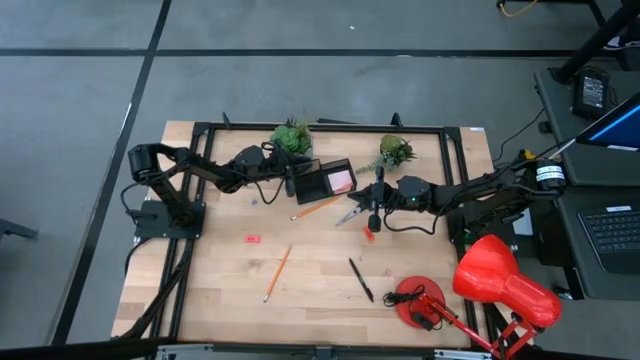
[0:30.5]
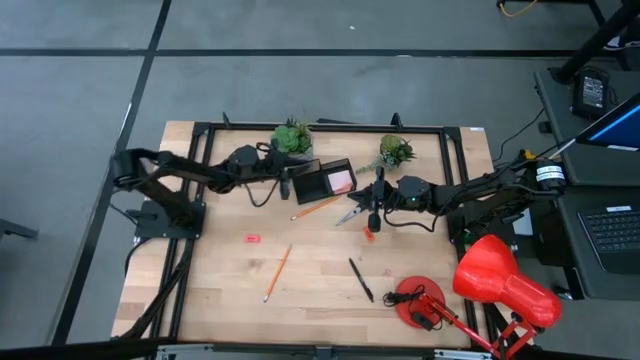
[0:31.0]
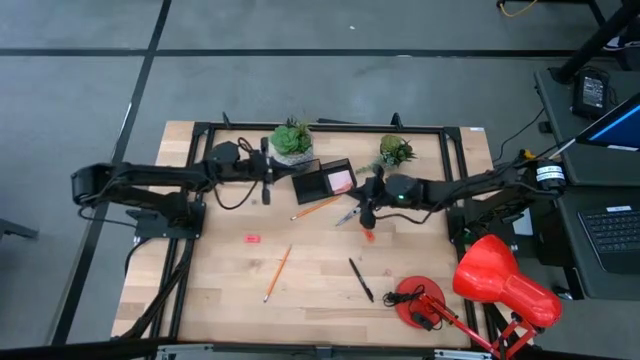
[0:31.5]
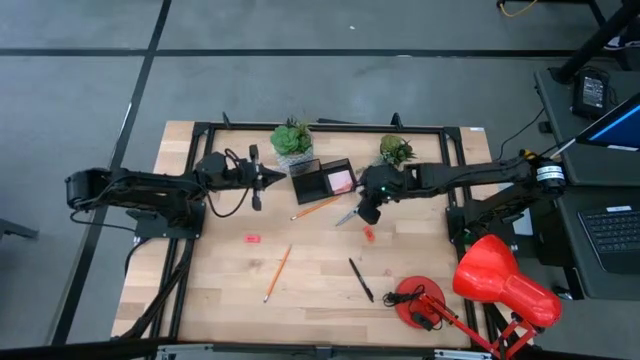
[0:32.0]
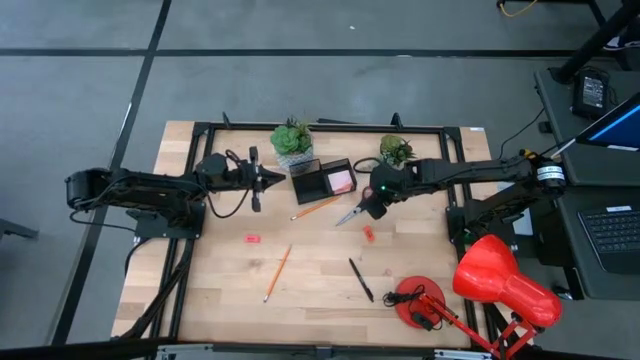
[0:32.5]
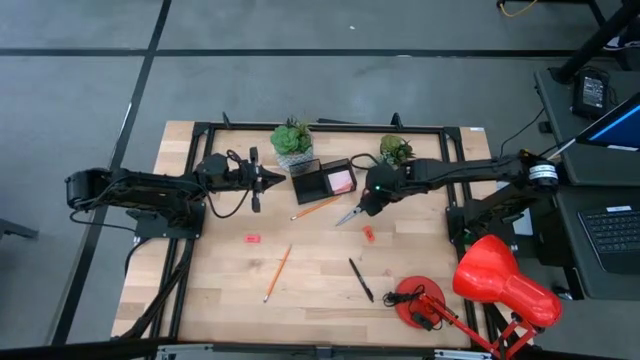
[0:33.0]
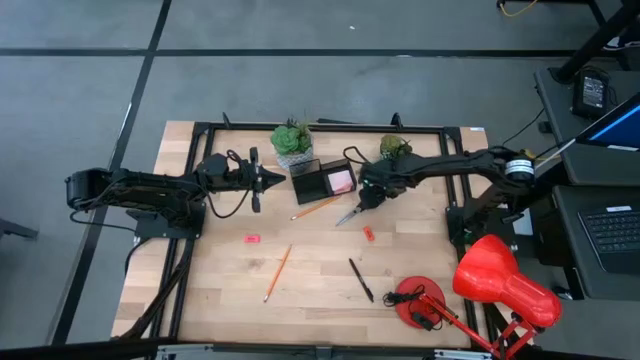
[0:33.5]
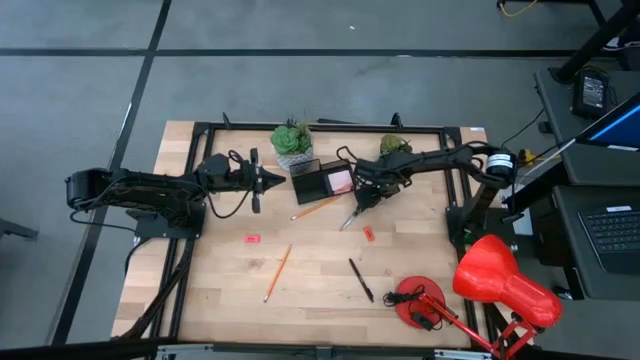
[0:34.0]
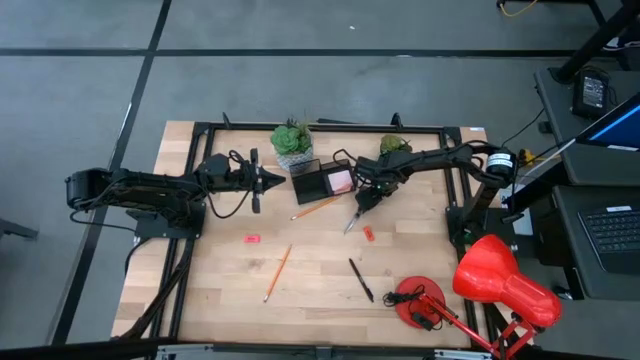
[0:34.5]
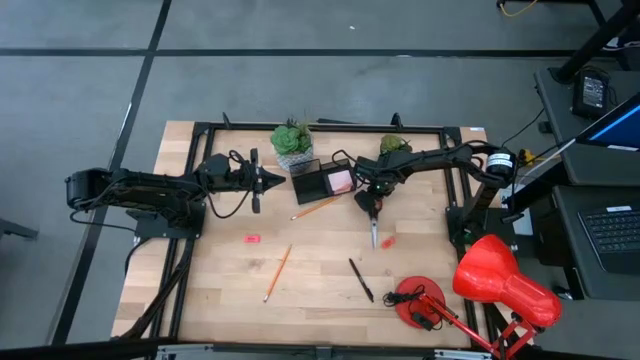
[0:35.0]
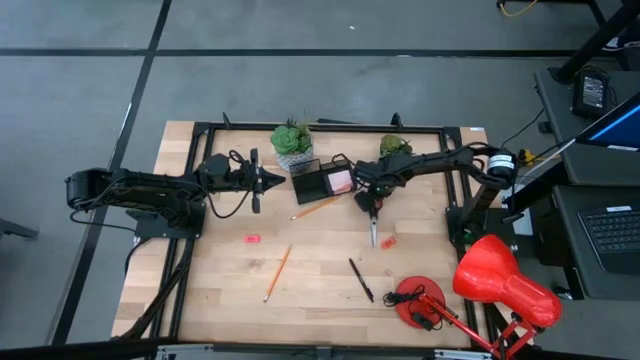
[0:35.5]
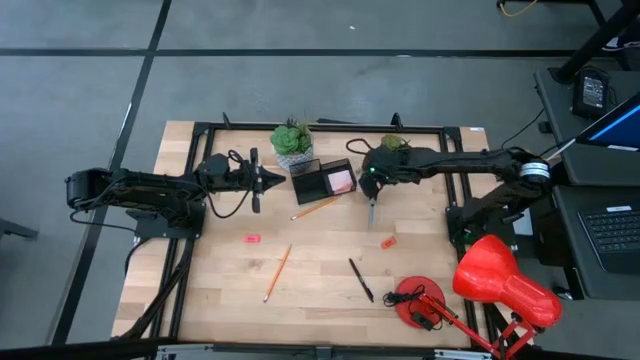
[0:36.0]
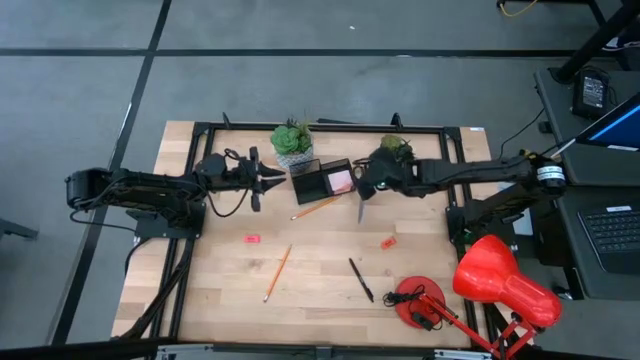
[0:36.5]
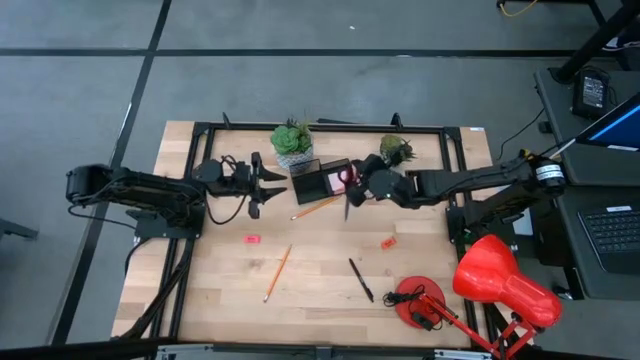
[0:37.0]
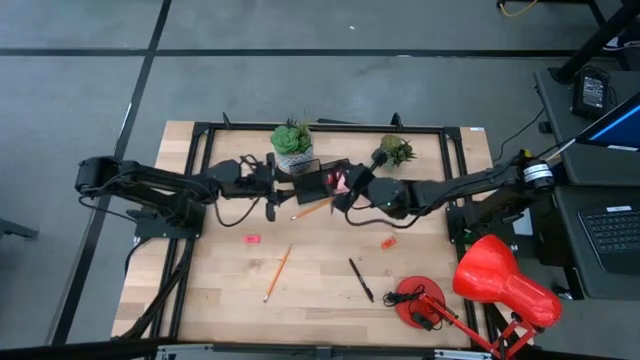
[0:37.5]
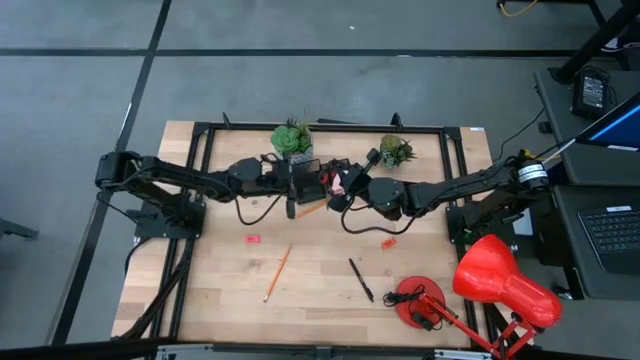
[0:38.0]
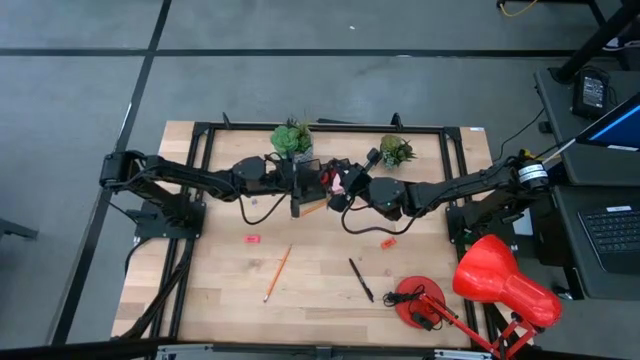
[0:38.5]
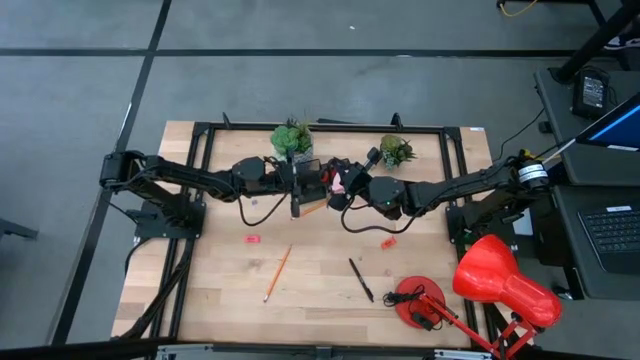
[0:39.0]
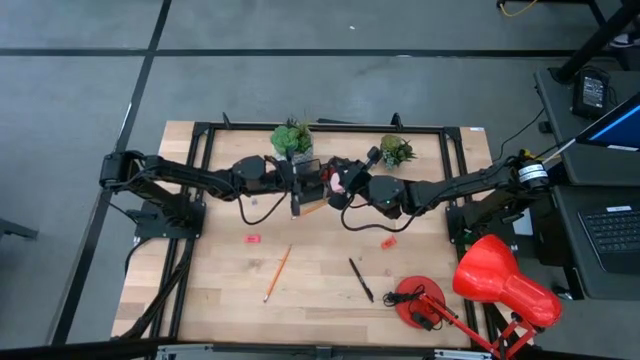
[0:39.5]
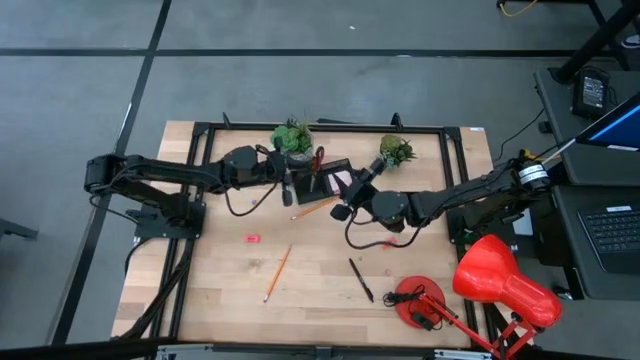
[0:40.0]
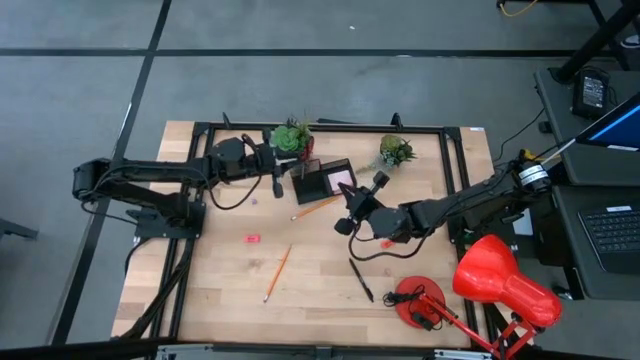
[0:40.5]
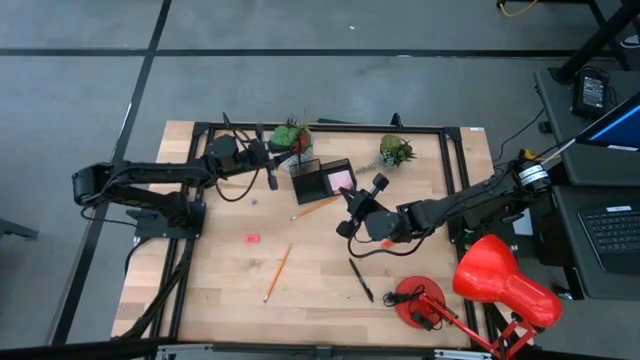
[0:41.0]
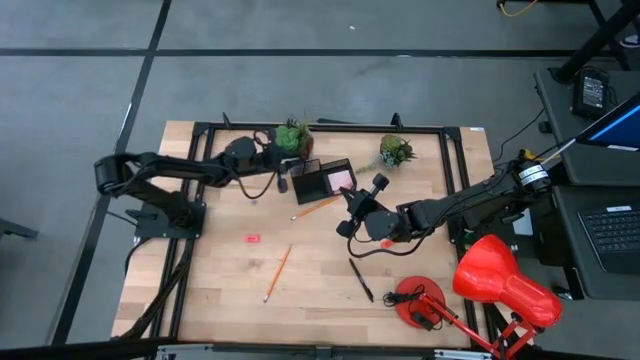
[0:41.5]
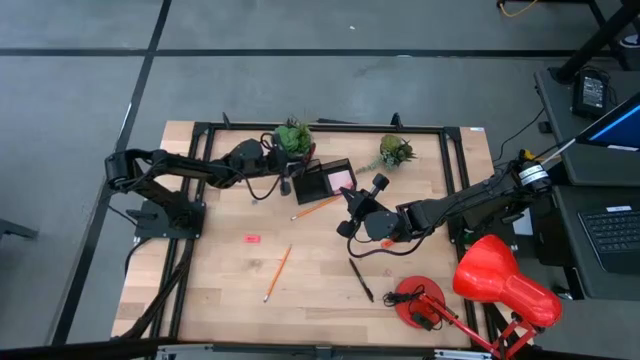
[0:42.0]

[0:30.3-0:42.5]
Task: Pick and place office supplies into organizer
Put the black scissors into the black desk organizer

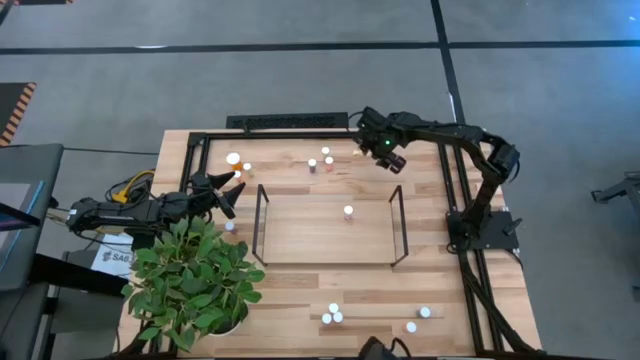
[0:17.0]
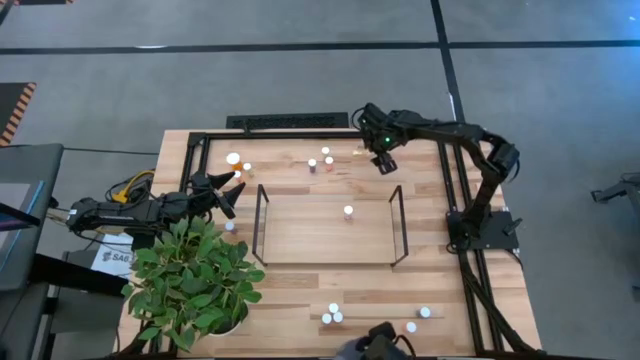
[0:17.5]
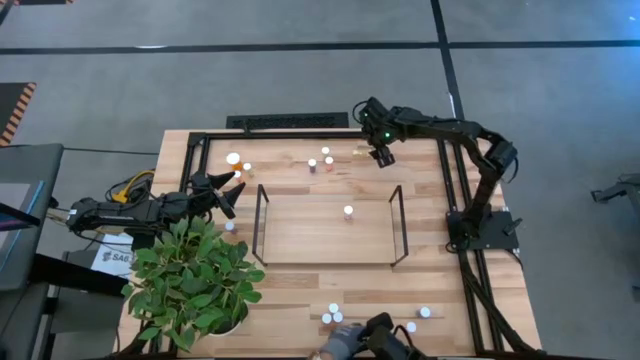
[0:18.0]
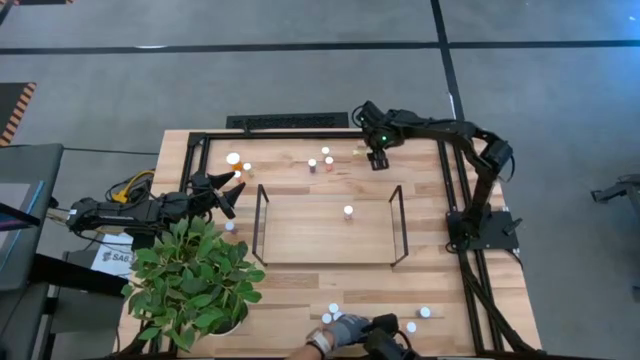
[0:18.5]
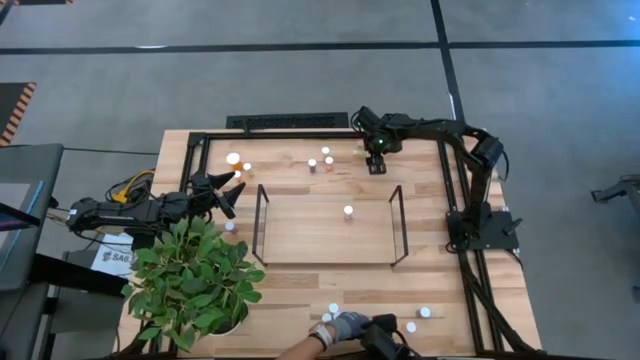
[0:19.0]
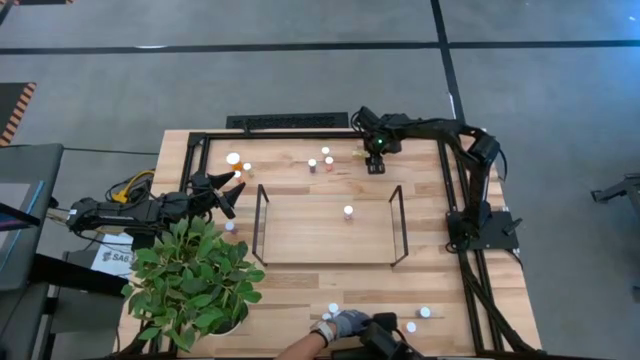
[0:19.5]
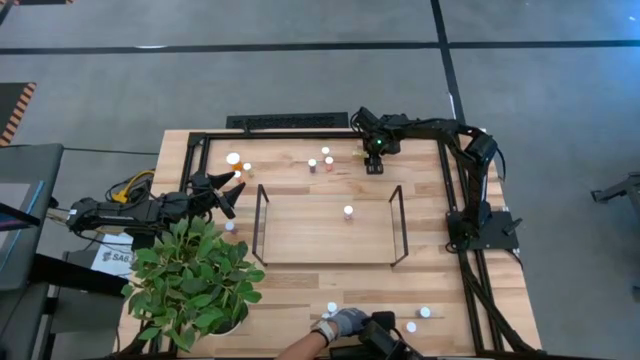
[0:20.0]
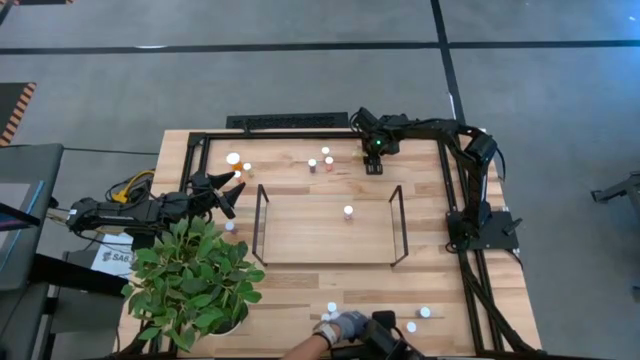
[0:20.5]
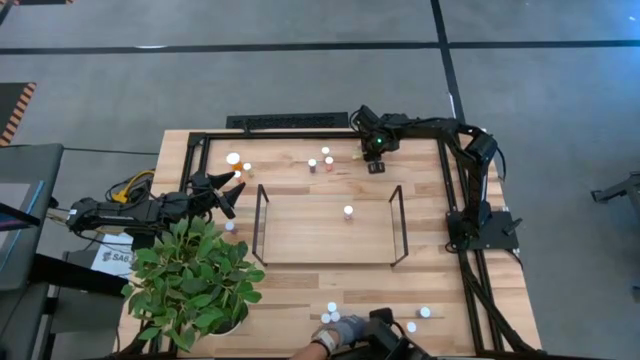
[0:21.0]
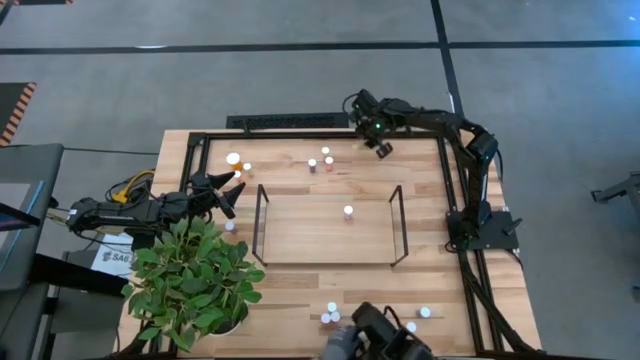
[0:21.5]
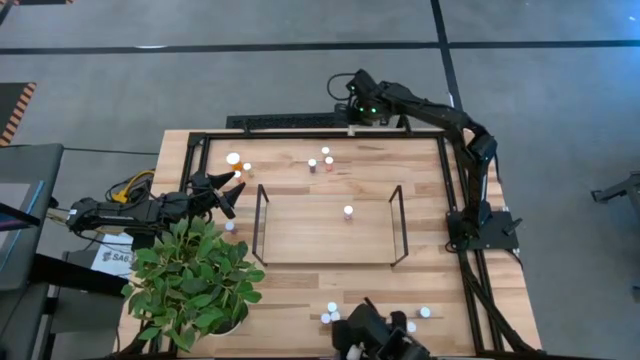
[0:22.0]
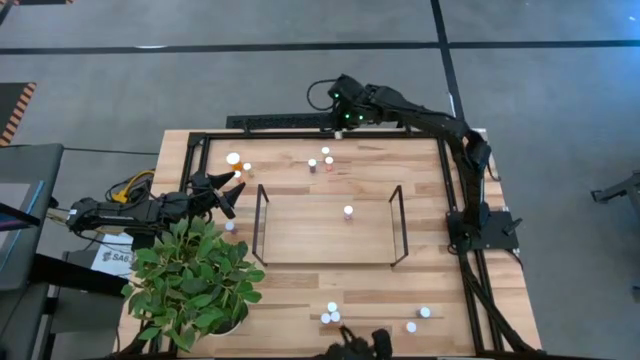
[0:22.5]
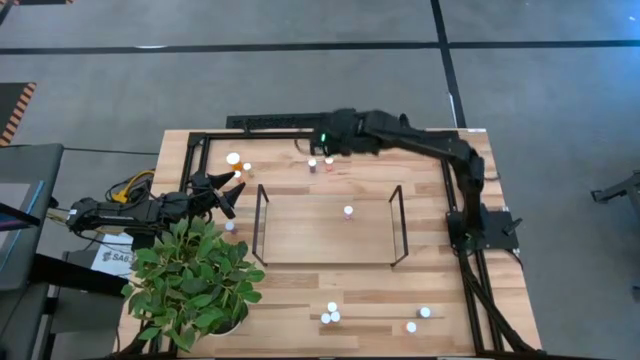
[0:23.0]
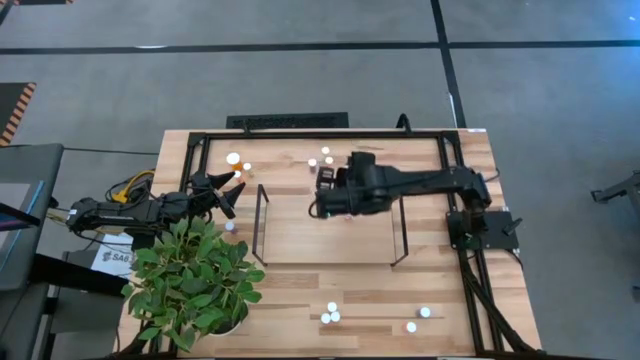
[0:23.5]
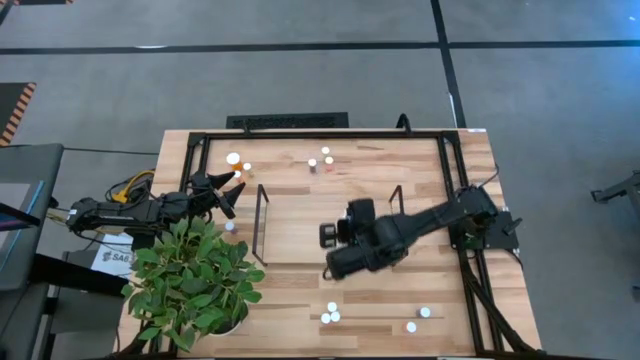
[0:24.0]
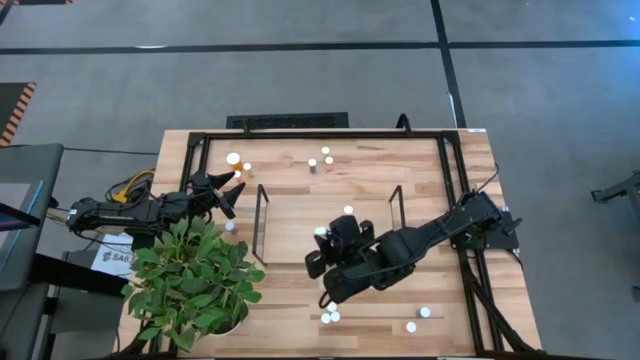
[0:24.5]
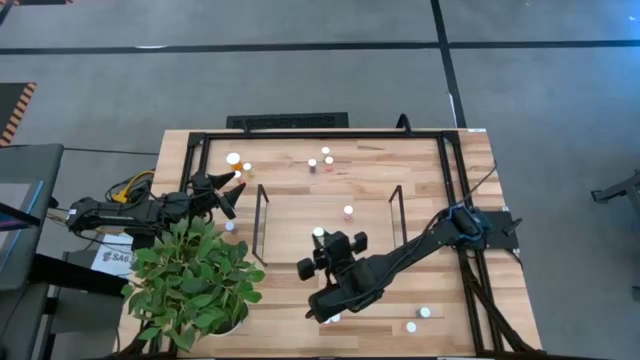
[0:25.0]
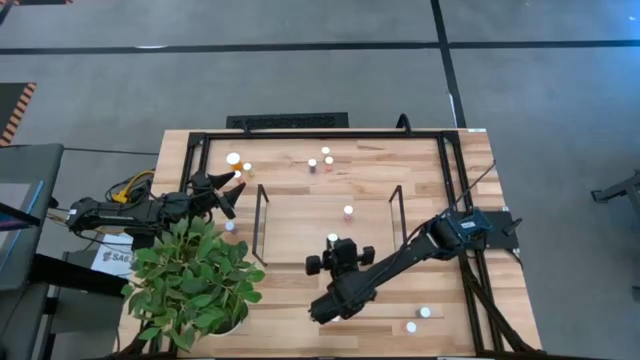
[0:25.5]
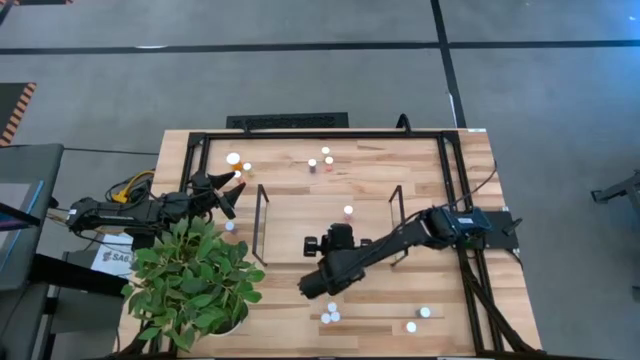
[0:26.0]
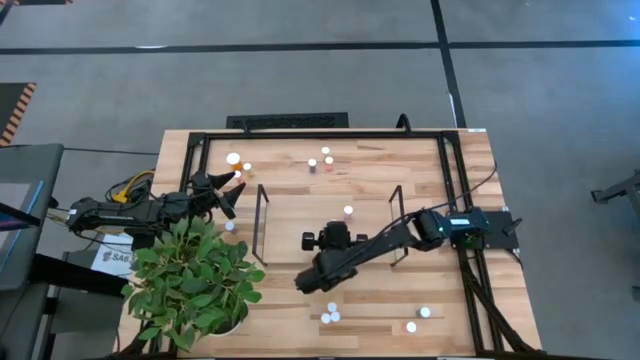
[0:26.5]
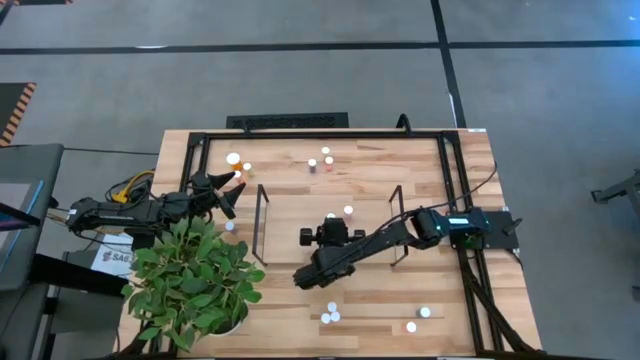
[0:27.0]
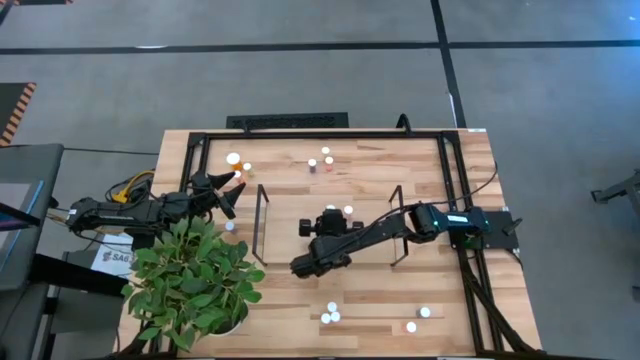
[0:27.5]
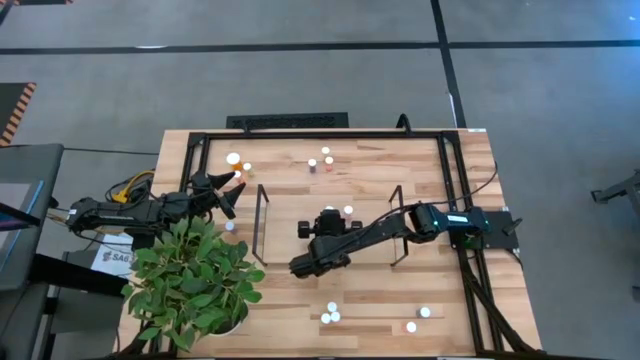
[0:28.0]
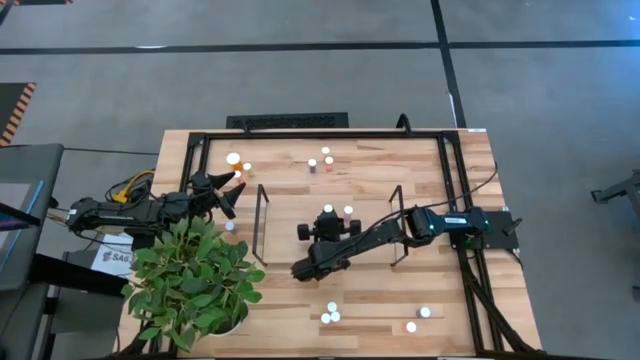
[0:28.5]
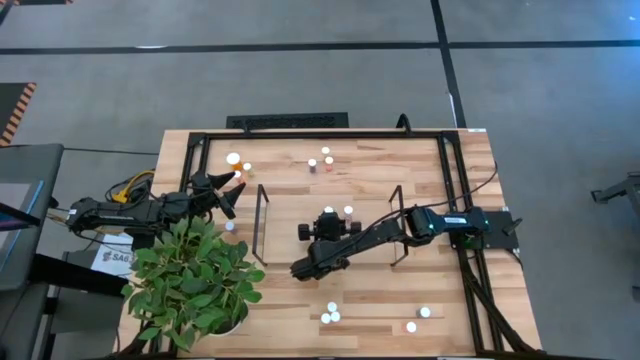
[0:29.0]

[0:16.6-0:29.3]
Task: Pick and place medicine bottles onto shelf by color
Put the yellow pill bottle on the shelf
